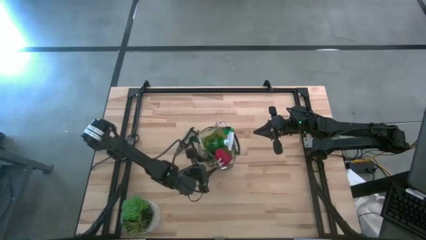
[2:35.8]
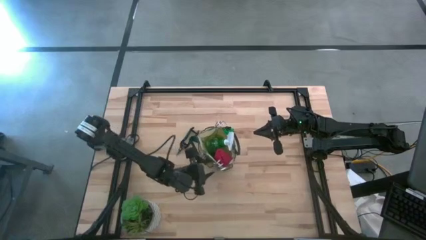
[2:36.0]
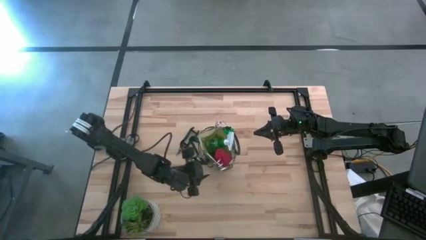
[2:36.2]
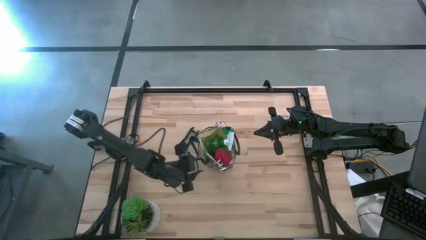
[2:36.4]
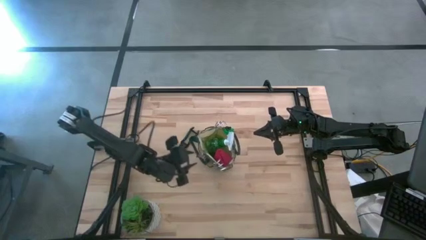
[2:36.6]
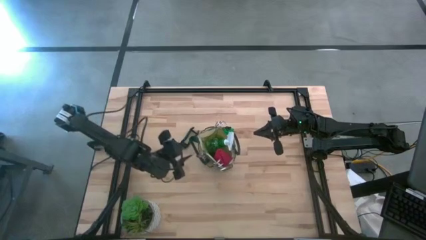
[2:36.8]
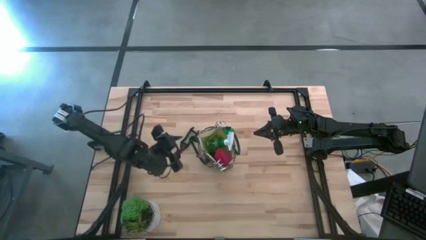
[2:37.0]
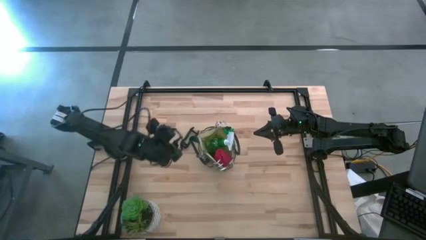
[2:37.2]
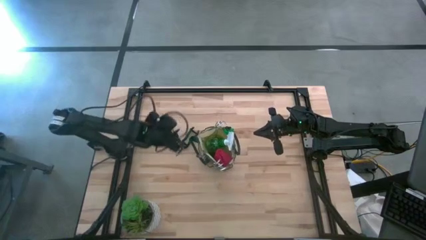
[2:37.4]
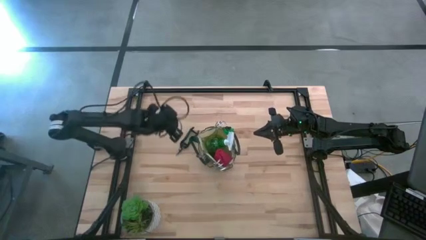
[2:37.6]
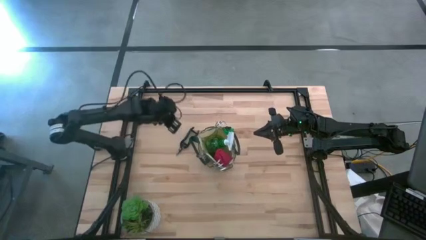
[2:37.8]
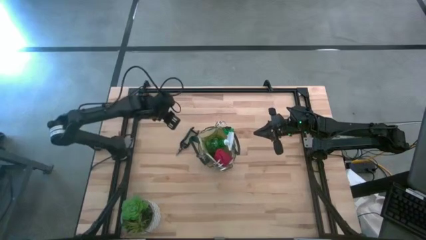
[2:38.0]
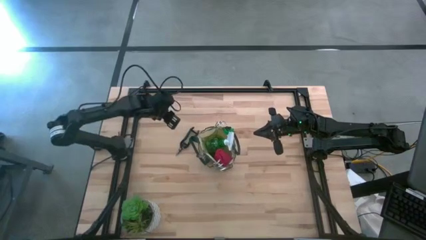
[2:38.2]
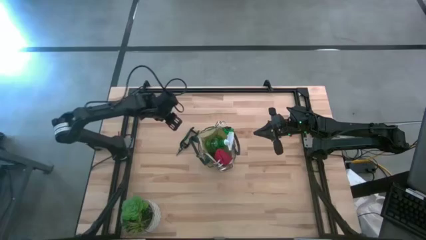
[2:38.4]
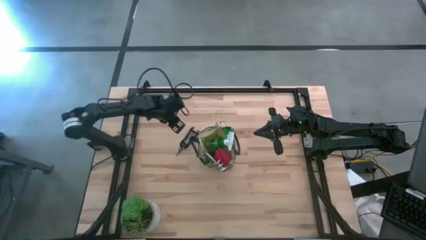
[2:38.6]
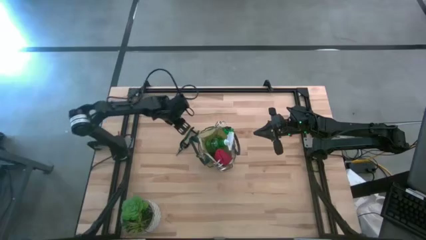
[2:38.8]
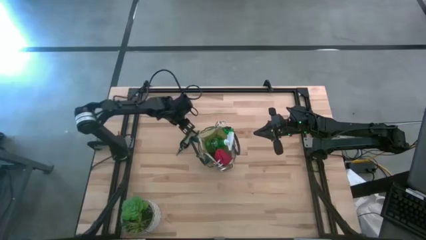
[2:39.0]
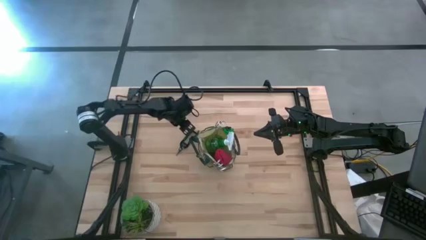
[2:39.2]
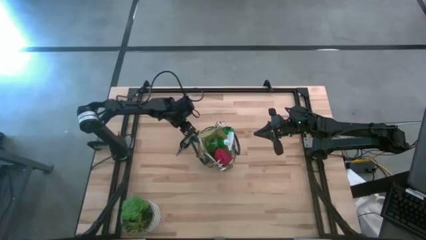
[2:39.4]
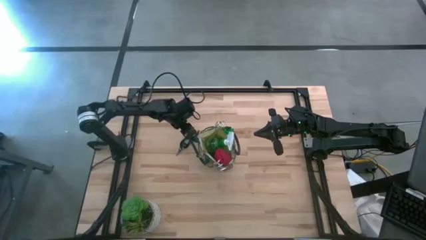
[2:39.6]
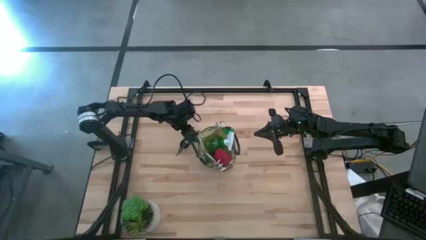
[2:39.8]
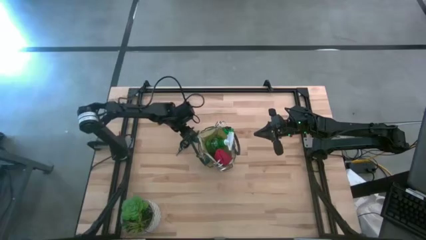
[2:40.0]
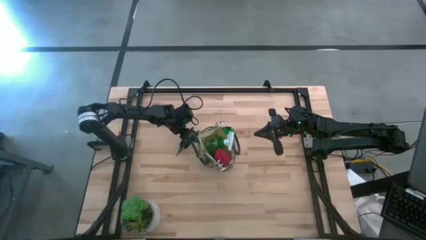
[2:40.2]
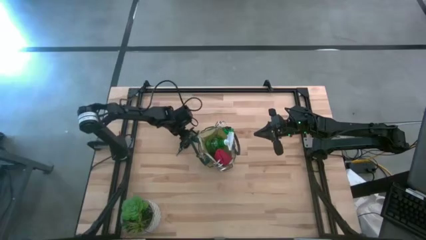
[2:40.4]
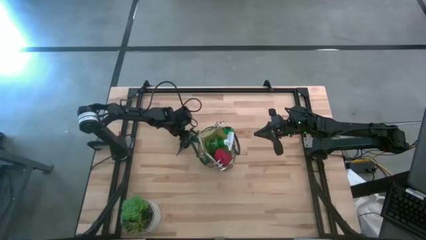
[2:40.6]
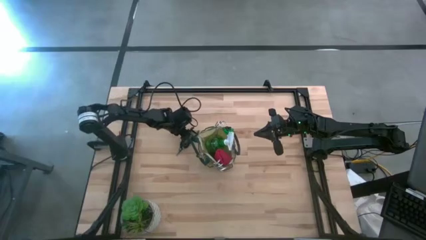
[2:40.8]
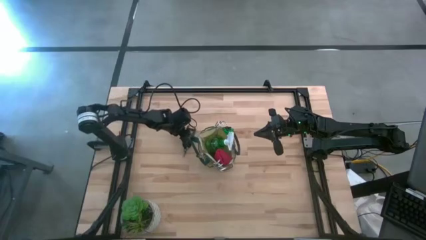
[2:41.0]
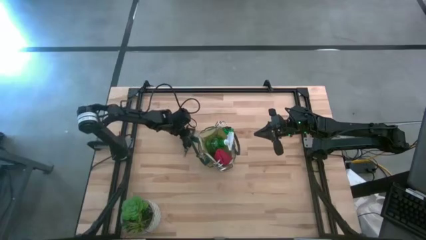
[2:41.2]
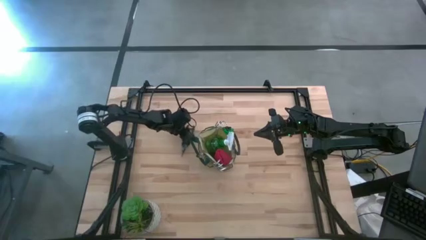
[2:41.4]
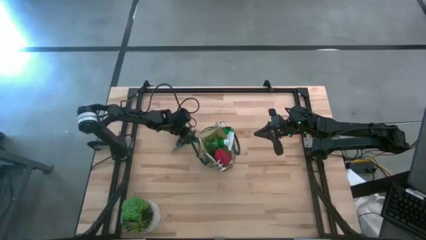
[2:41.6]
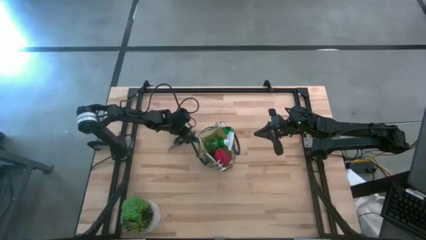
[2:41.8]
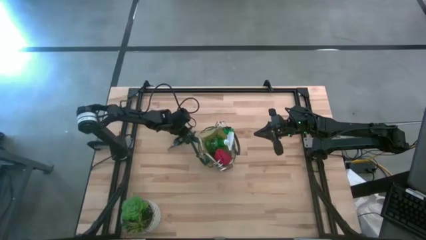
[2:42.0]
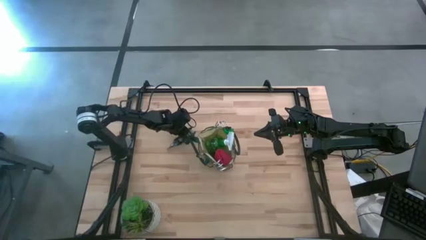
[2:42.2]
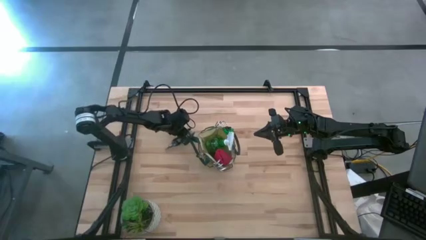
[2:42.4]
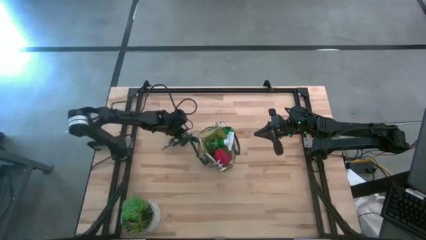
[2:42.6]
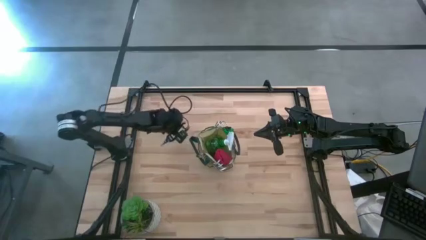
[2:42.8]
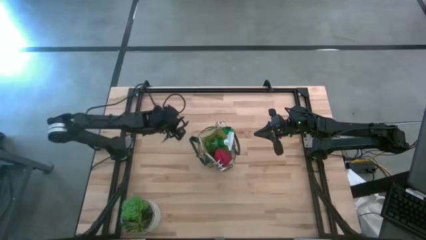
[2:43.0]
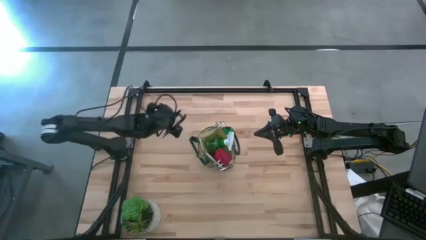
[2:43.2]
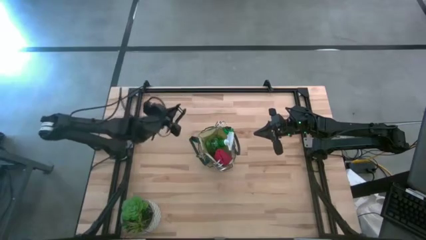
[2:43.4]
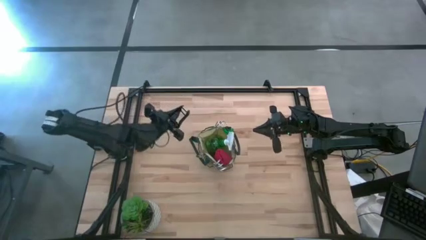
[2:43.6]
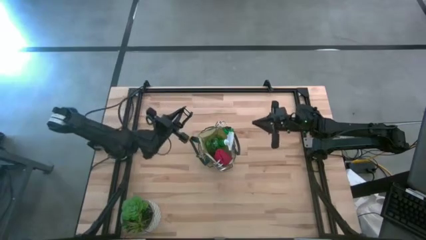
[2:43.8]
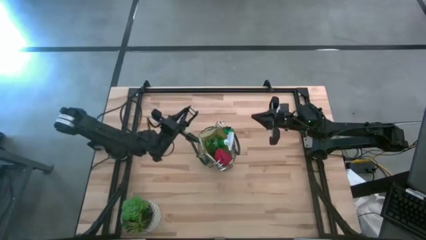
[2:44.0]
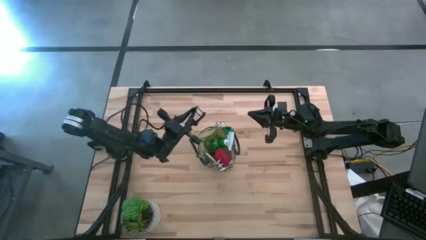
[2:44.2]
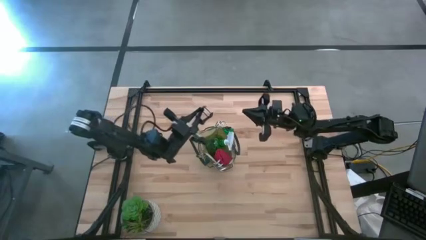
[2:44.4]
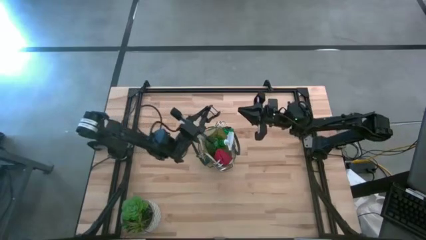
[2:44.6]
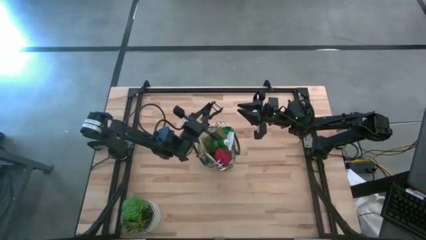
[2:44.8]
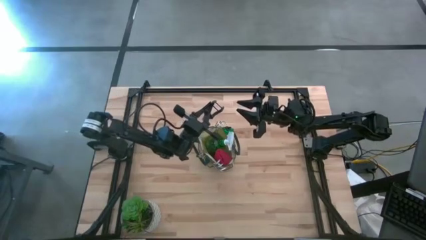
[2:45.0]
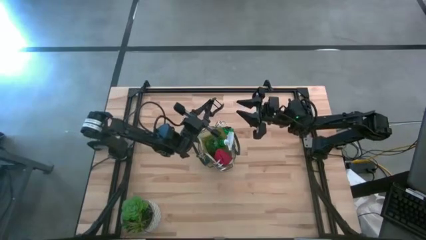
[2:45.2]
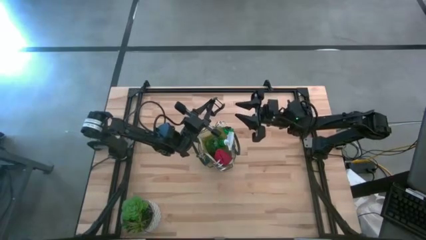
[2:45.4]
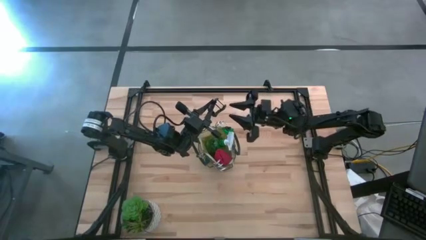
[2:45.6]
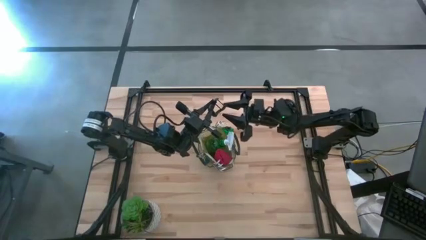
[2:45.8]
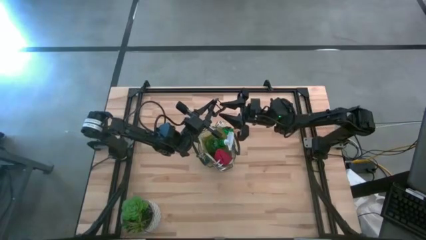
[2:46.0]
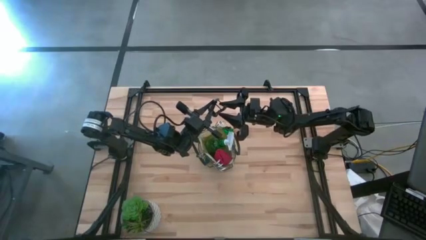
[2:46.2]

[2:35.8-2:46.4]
Task: Pick & Place Garden tools in Gardening bag
Put the shear scissors into the pocket of the gardening bag

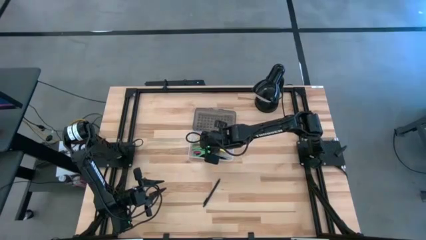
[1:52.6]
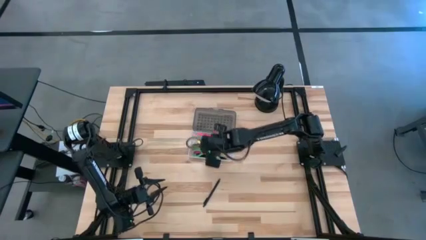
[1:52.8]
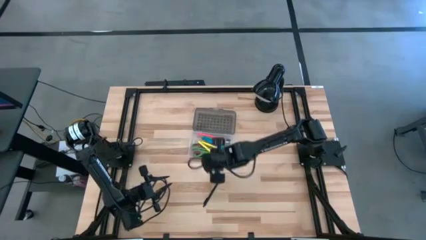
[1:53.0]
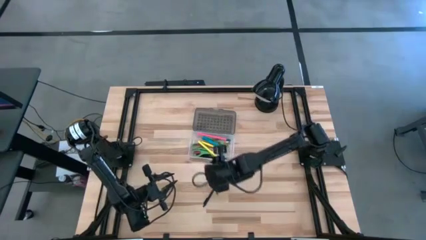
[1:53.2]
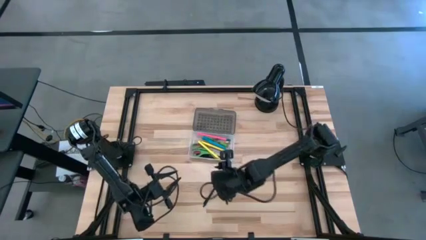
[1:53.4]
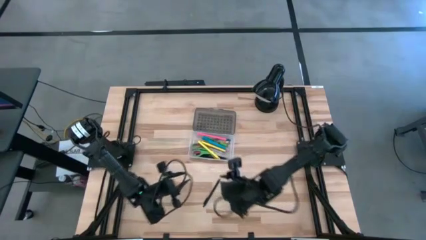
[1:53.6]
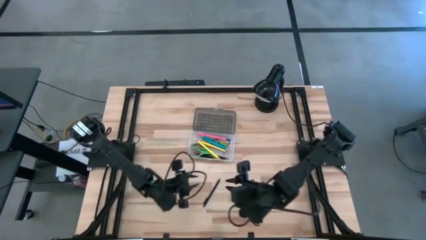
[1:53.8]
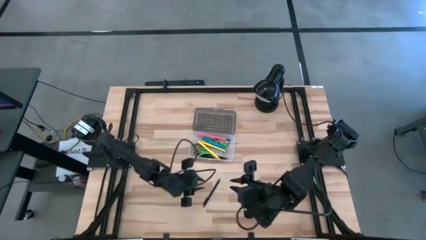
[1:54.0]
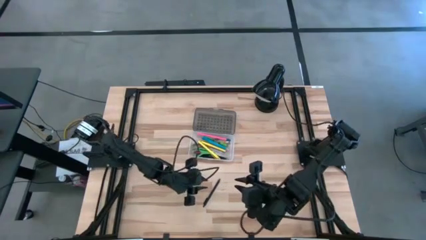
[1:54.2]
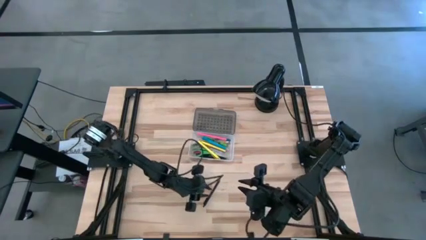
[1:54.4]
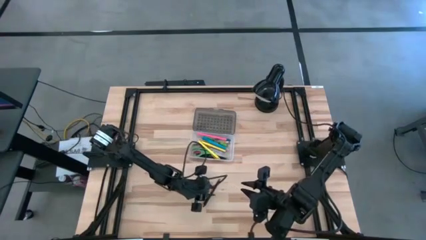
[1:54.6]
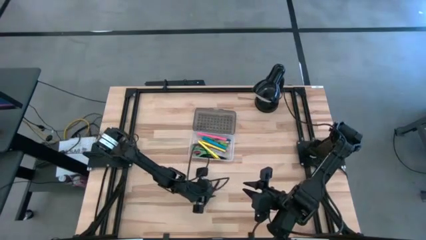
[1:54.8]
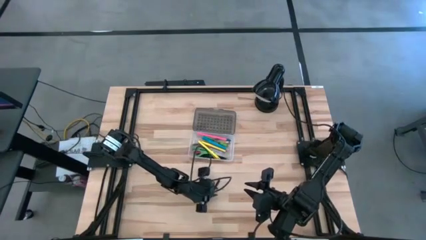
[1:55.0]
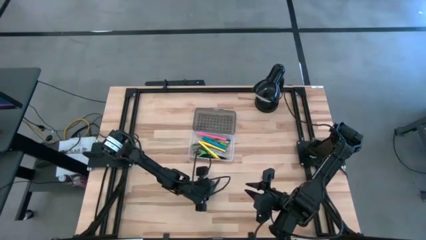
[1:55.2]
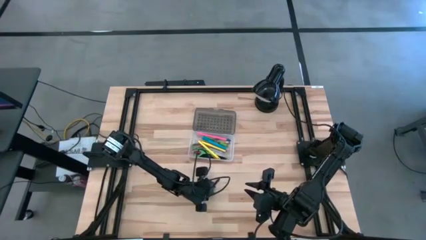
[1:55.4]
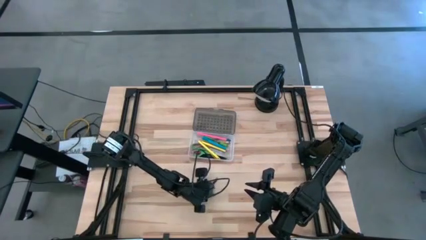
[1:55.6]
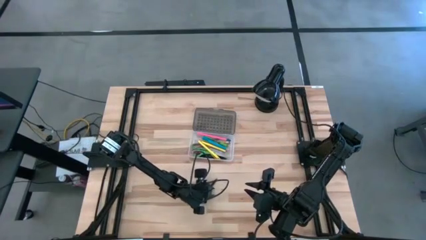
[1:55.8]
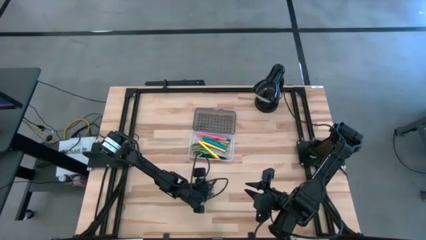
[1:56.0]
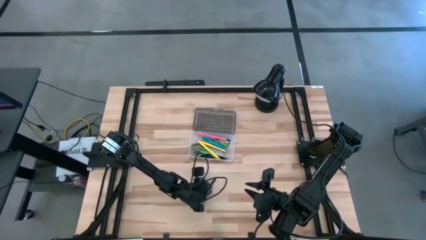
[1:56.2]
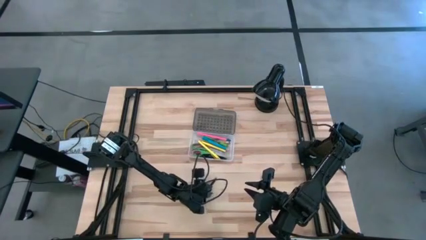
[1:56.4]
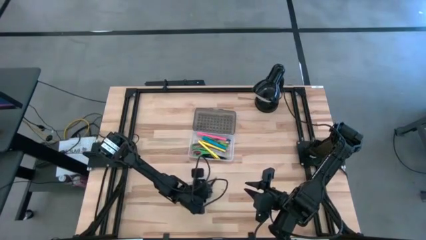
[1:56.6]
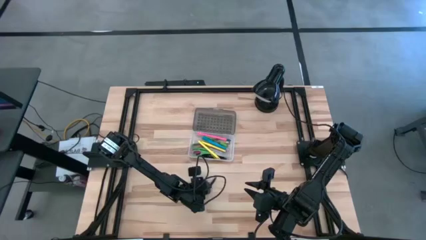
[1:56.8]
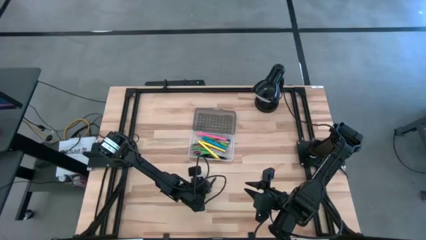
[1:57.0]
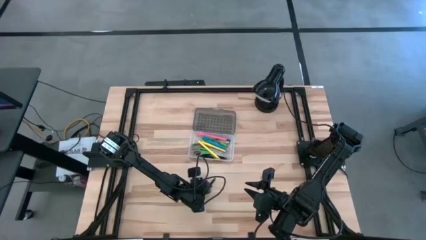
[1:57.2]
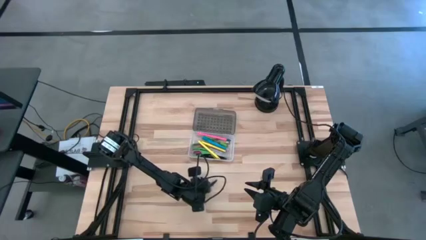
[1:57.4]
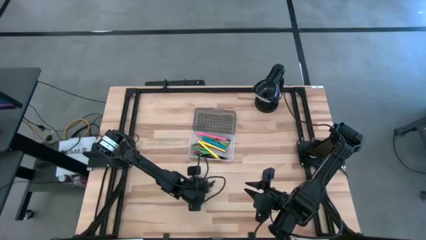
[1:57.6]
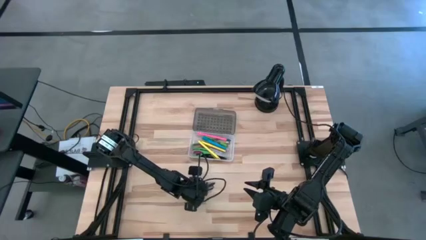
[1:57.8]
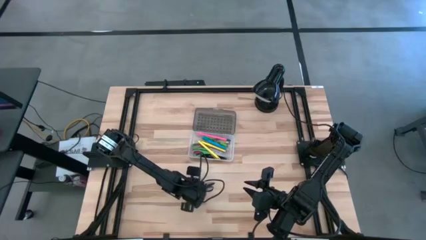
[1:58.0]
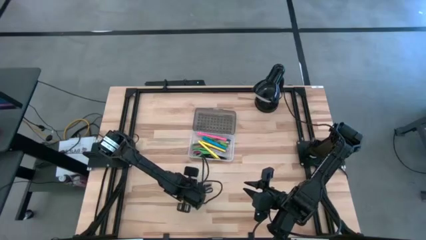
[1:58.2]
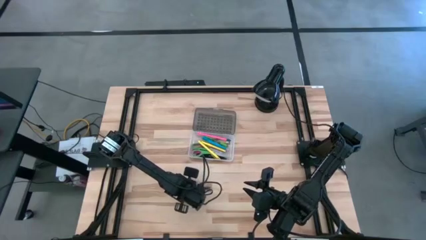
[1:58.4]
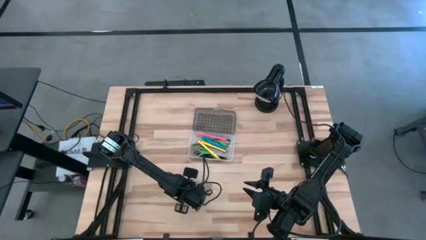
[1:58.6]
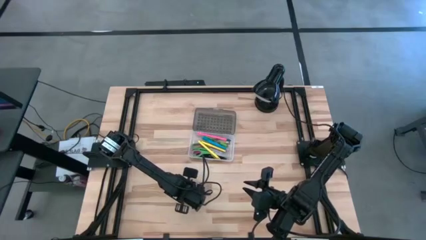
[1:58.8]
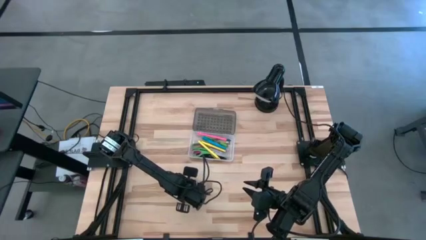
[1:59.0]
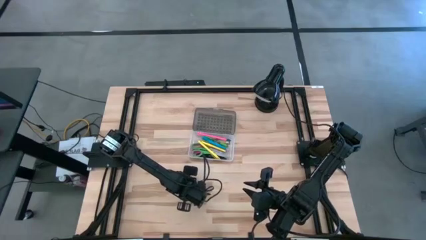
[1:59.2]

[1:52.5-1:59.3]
Task: Pick & place school supplies into a supply box
Put the black pen into the transparent supply box
